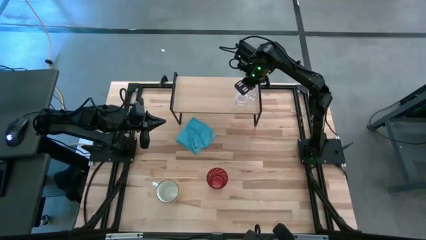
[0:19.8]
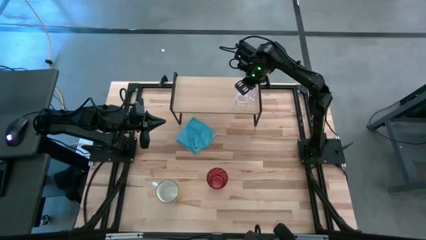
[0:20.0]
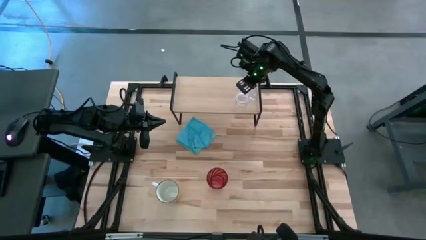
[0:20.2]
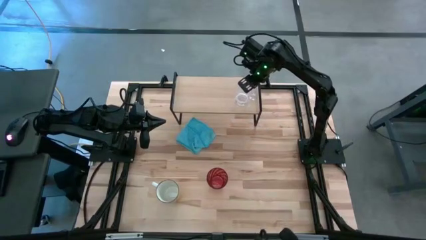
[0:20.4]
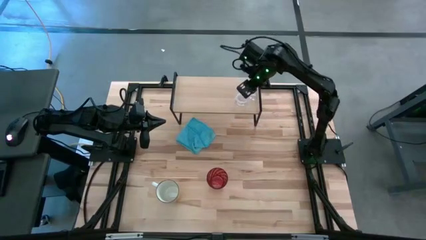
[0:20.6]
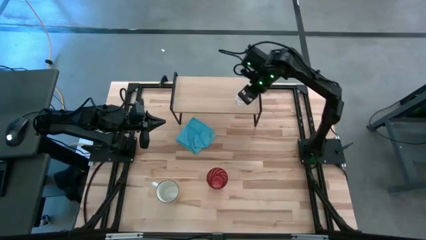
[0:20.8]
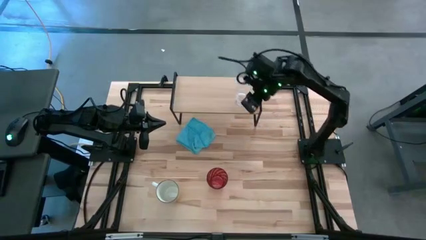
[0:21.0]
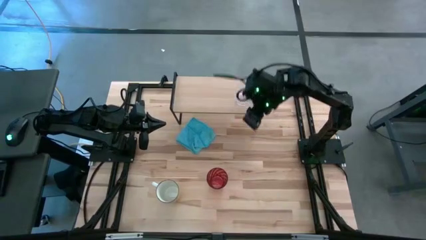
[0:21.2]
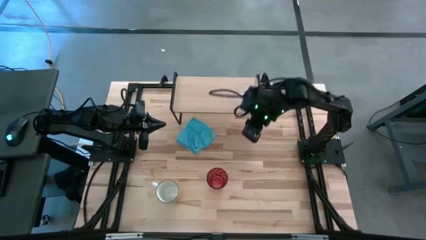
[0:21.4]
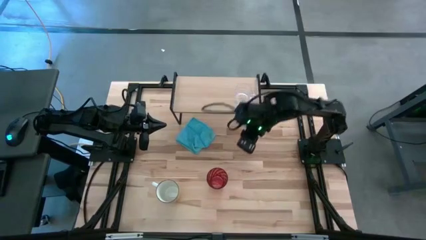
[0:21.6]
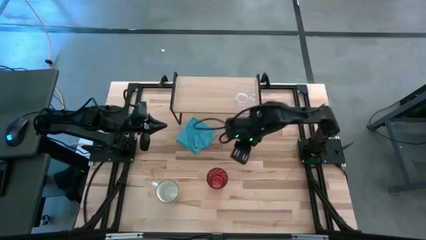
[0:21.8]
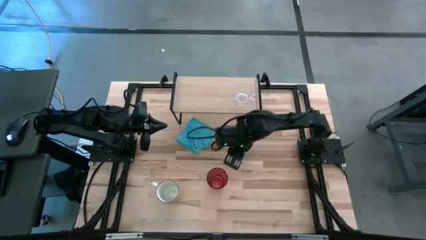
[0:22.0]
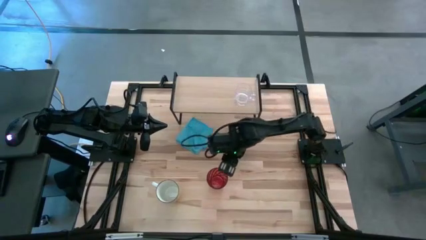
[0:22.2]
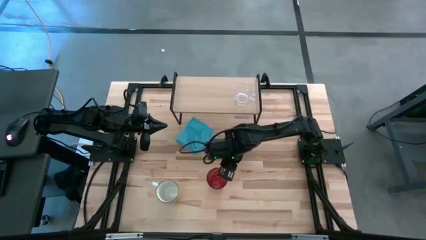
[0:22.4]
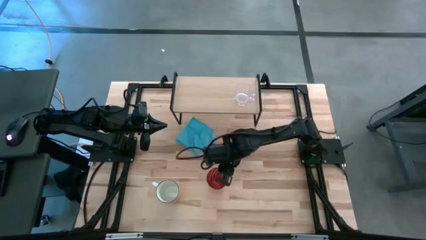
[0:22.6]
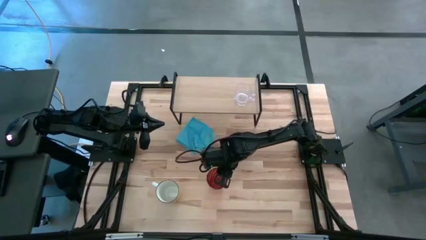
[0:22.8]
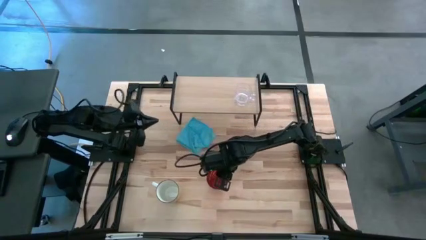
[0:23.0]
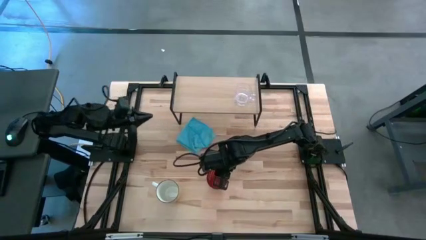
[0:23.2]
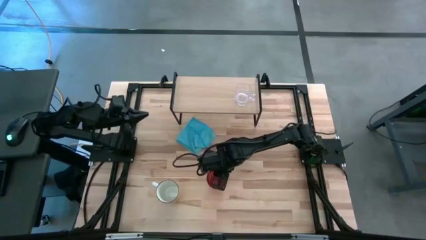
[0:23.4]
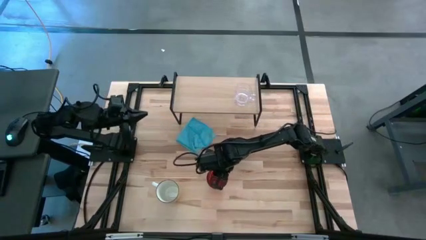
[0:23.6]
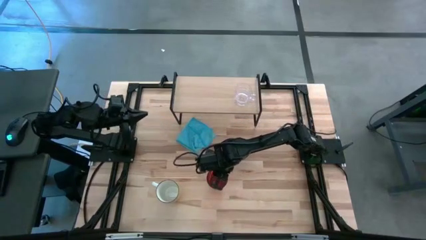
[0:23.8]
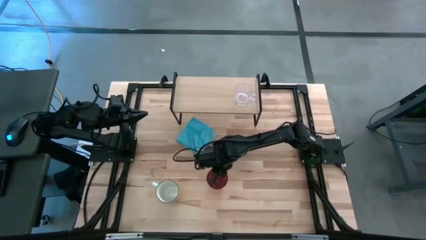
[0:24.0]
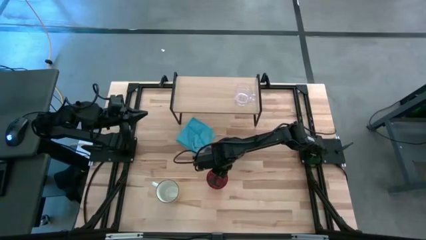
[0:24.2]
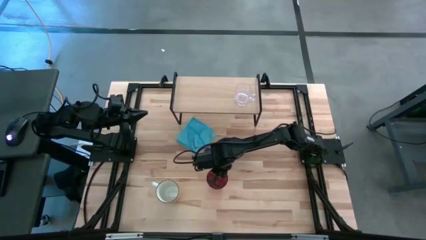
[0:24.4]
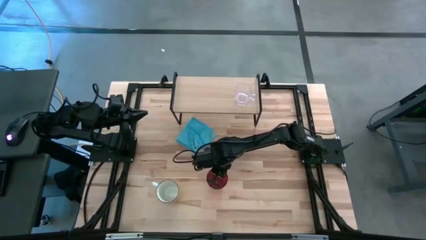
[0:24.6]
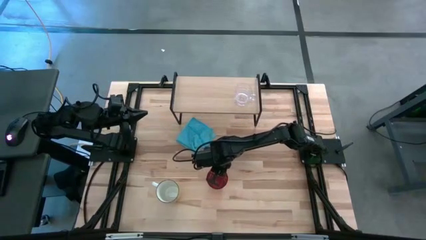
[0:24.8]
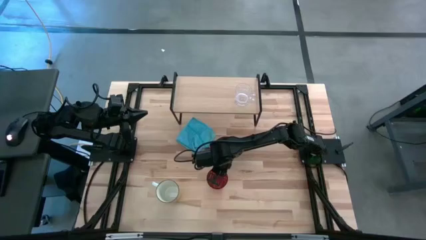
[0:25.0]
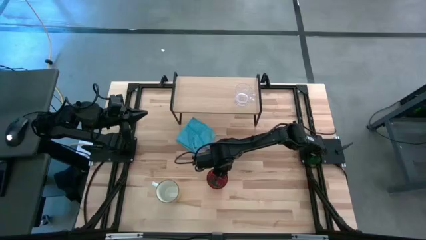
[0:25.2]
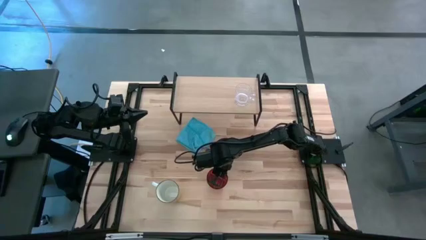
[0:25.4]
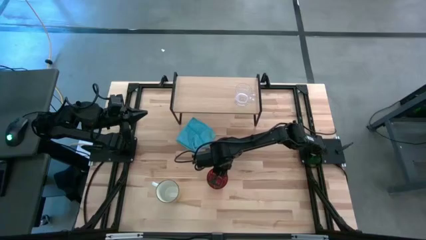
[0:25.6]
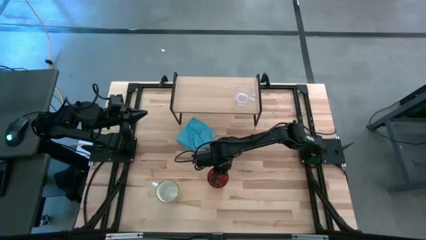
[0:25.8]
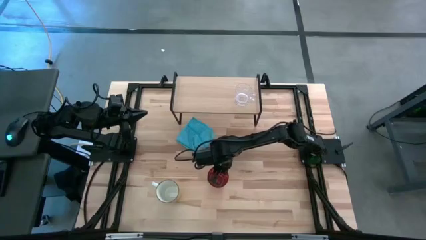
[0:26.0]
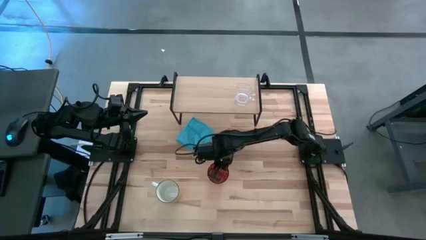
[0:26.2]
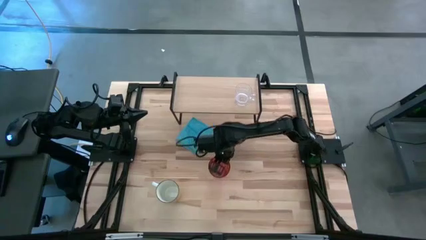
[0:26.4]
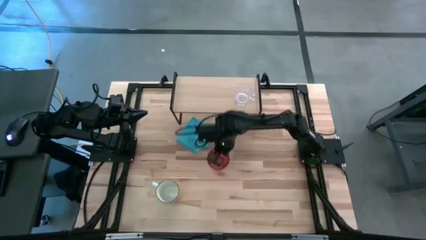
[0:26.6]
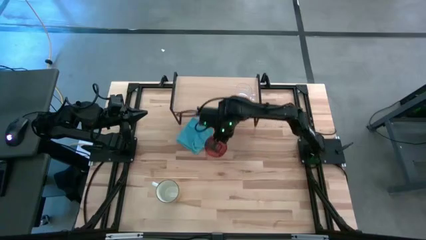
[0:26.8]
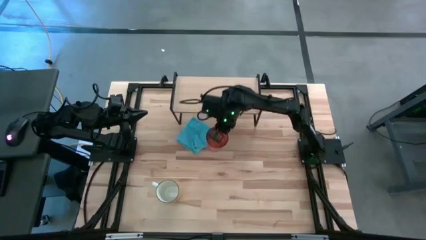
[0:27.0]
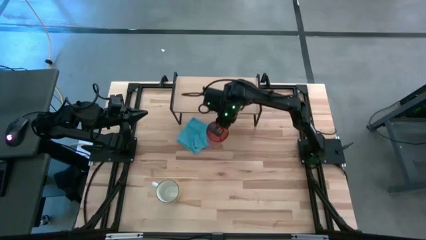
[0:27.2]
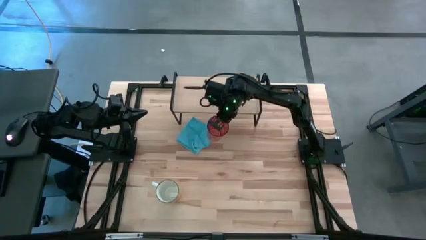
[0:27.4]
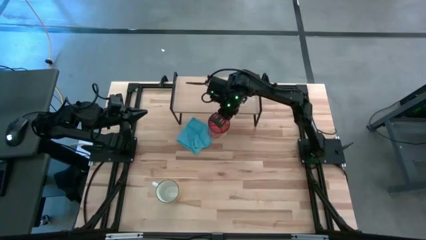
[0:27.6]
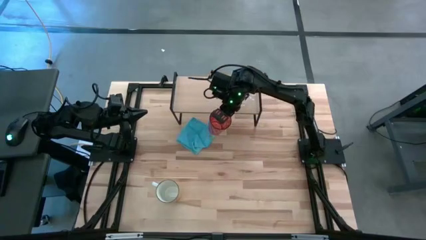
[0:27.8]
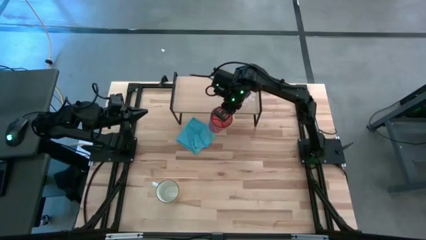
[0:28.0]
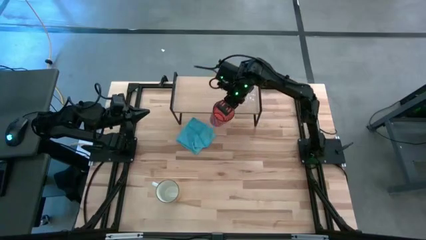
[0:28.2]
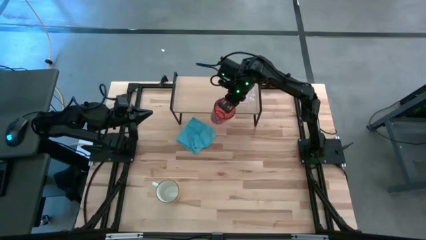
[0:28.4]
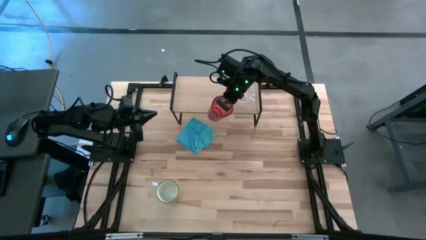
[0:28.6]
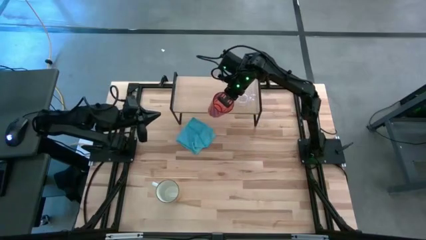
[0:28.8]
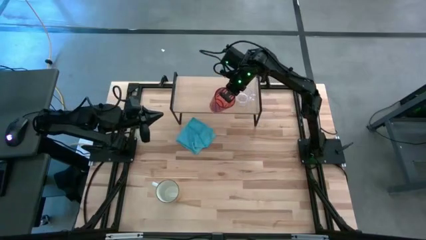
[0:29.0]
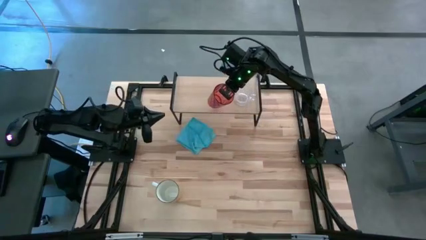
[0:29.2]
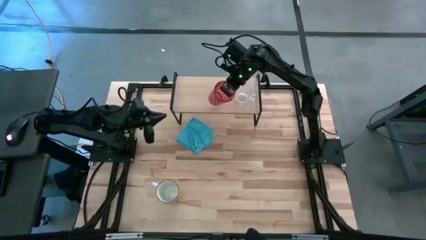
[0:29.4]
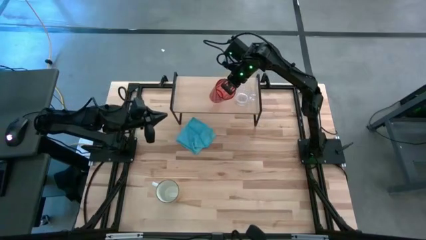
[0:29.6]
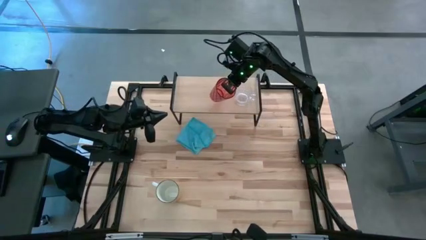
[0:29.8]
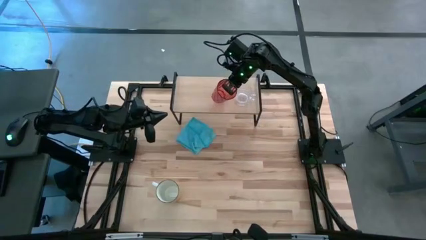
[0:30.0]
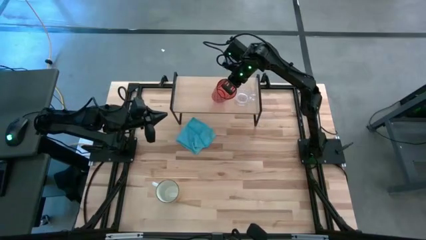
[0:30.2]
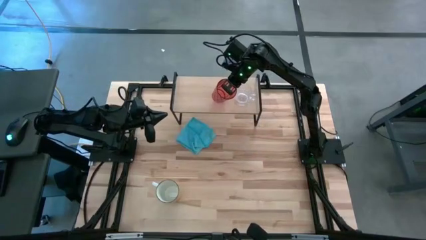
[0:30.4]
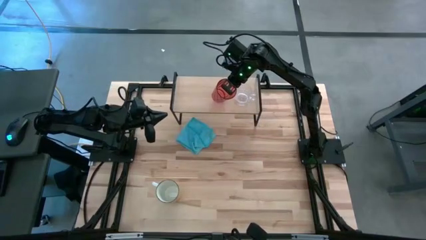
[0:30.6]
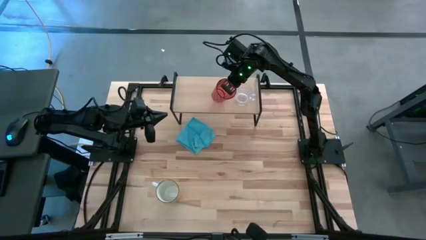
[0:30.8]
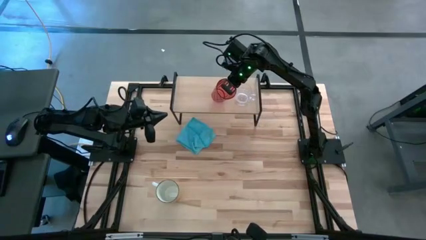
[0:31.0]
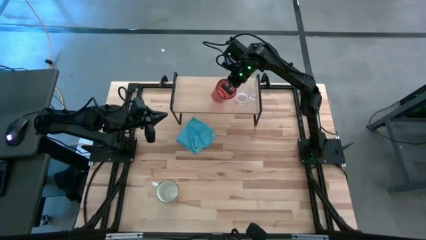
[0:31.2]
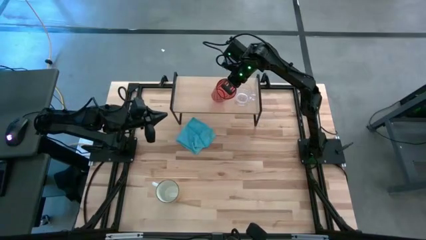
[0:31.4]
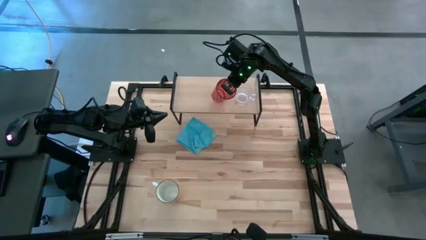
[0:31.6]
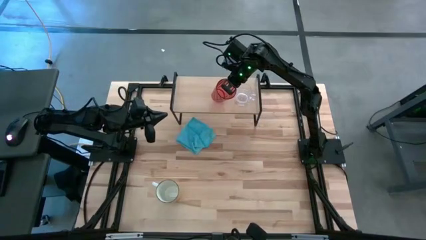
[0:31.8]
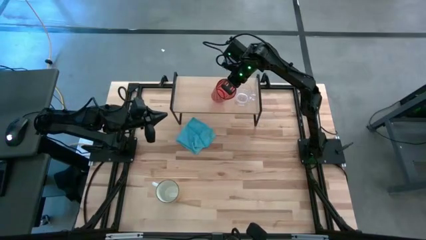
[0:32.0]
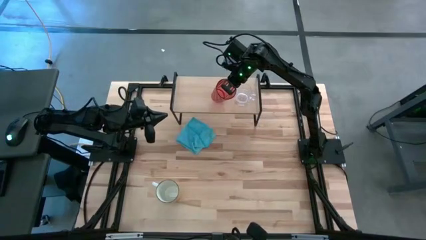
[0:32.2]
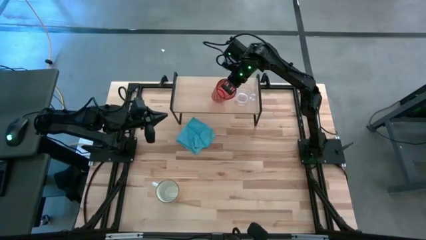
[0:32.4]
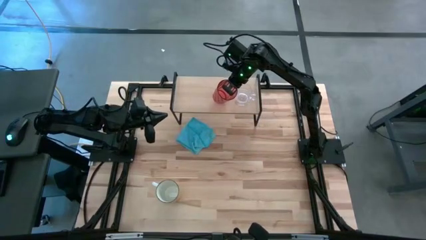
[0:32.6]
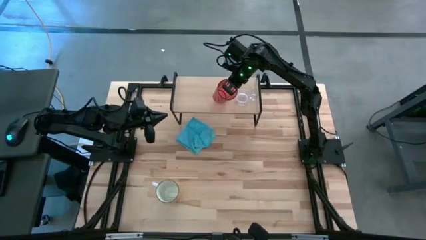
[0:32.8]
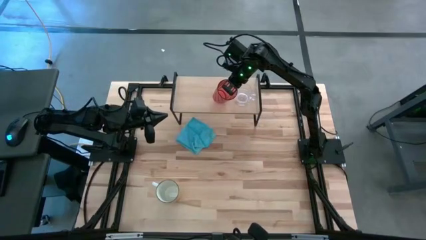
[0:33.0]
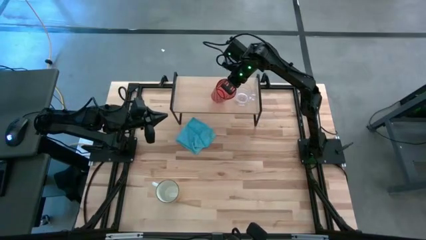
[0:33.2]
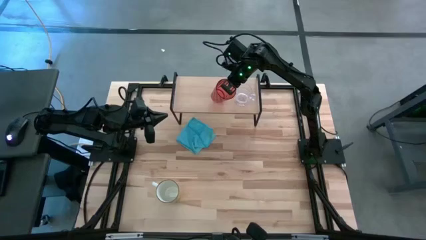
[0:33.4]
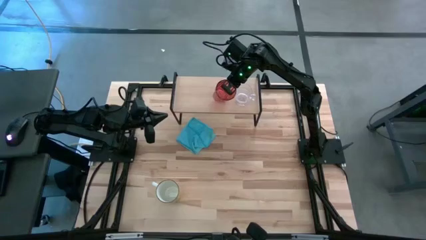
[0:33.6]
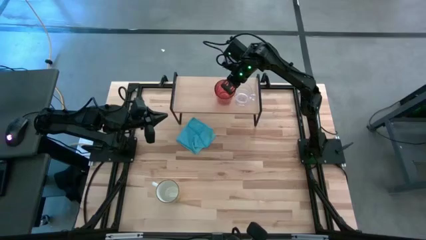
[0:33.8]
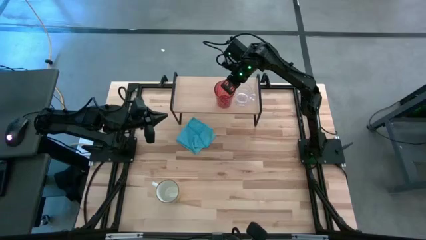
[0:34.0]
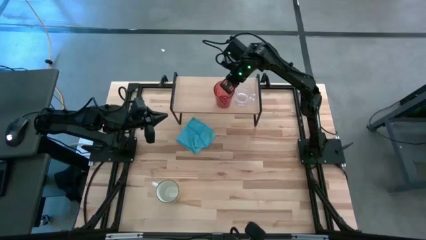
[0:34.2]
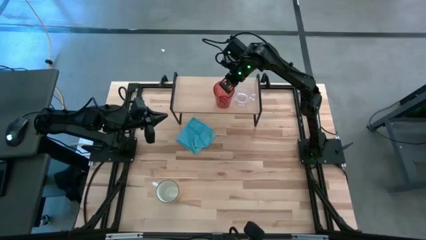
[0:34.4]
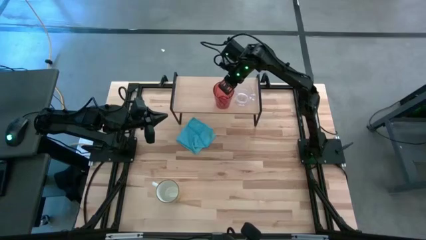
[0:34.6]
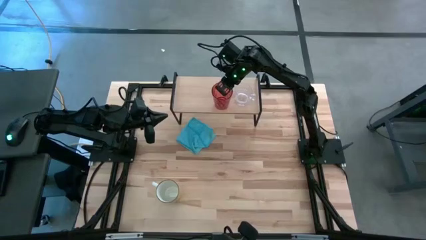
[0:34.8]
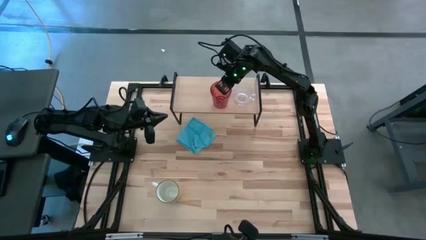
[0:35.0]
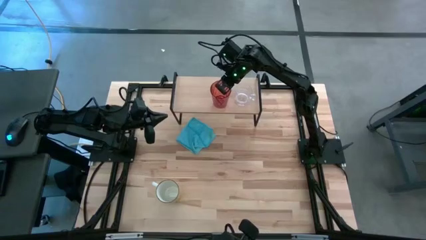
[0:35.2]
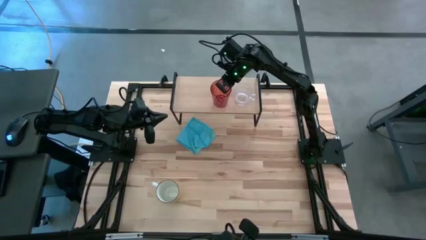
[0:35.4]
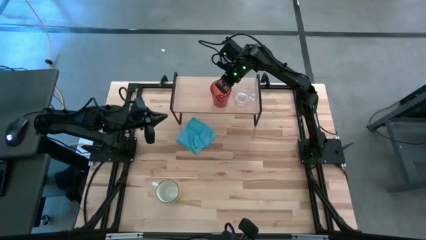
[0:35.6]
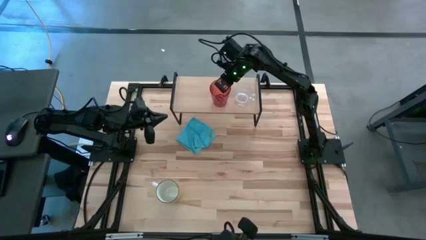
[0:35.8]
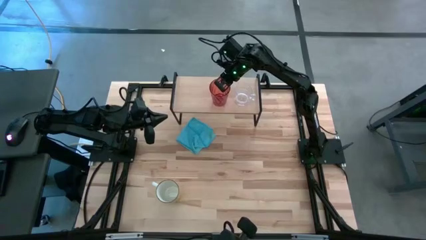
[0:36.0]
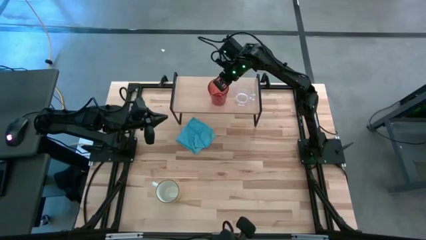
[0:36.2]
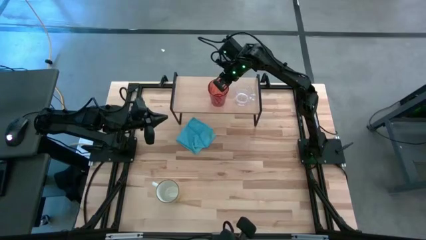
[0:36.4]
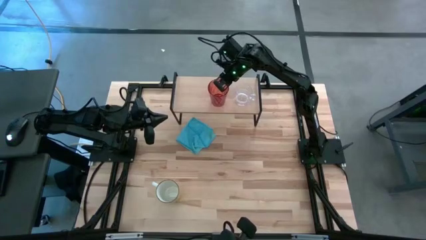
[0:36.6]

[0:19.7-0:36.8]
Task: Stack small to large cups/mugs on shelf
Put the red cup on the shelf
